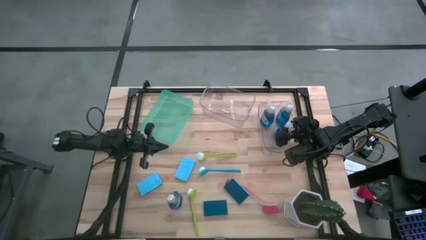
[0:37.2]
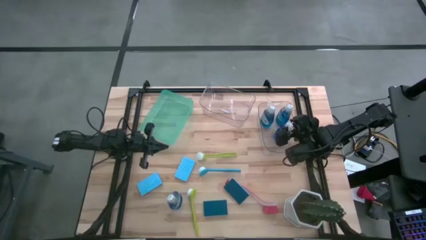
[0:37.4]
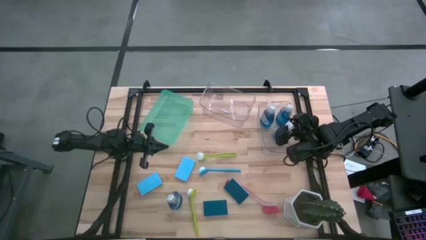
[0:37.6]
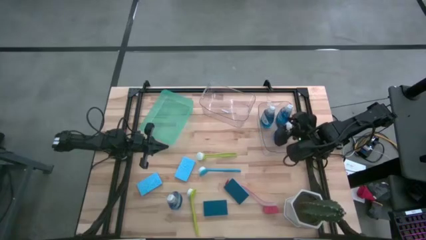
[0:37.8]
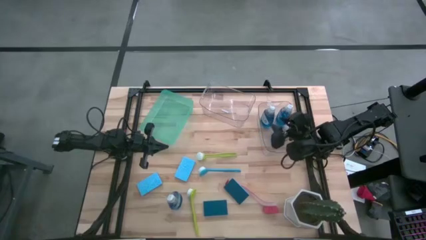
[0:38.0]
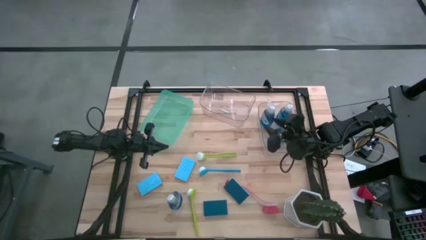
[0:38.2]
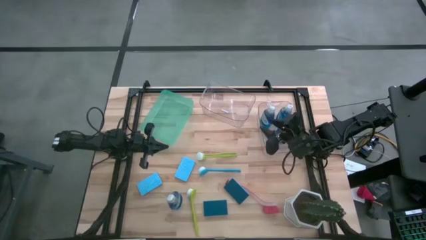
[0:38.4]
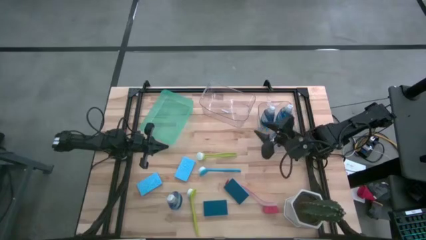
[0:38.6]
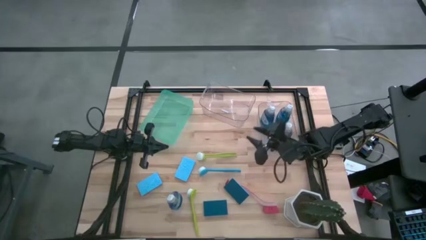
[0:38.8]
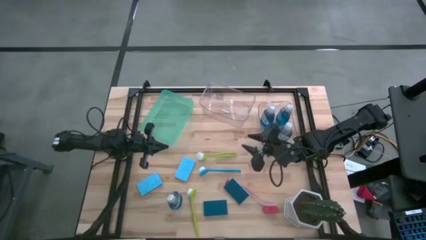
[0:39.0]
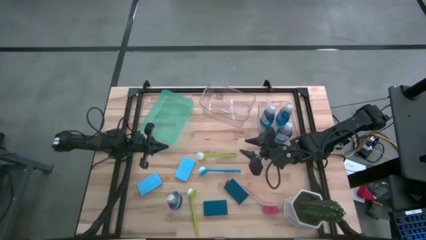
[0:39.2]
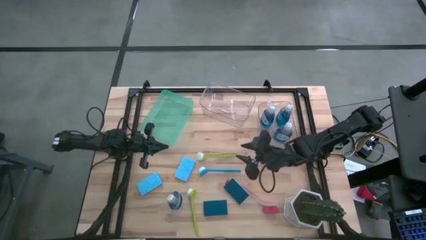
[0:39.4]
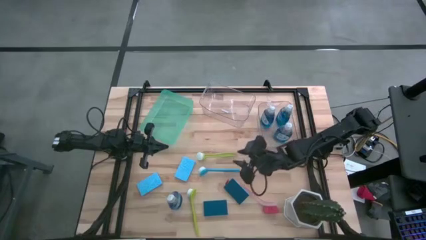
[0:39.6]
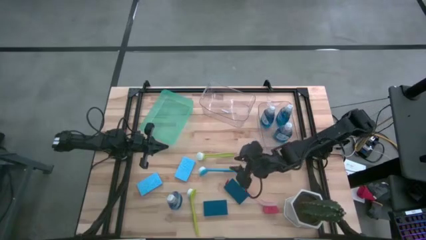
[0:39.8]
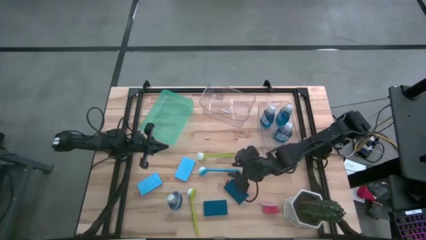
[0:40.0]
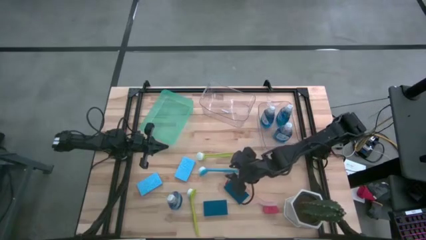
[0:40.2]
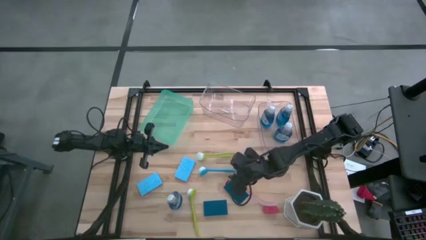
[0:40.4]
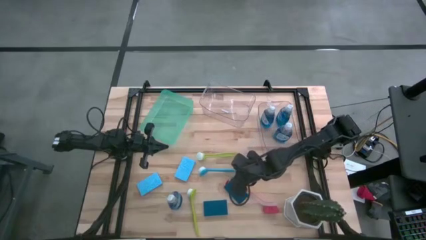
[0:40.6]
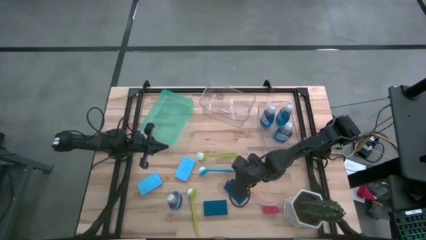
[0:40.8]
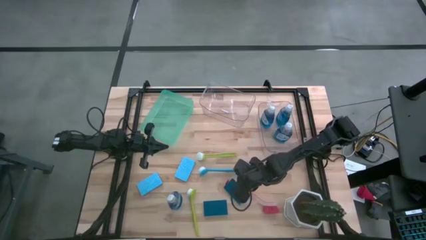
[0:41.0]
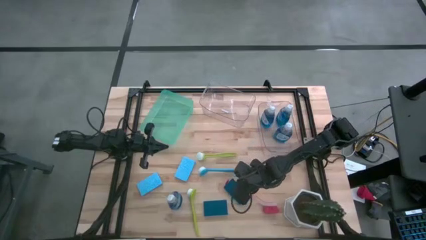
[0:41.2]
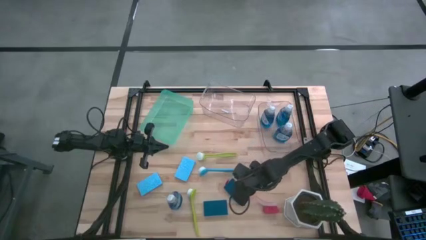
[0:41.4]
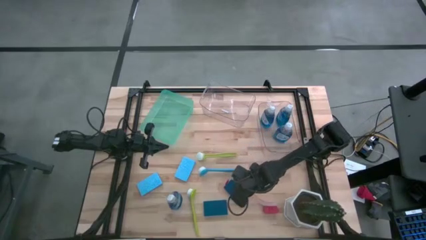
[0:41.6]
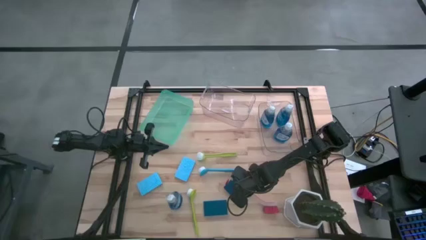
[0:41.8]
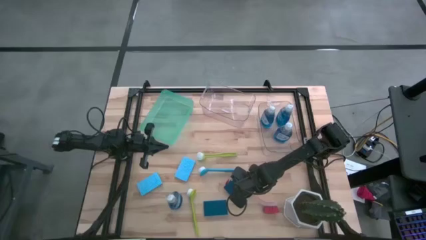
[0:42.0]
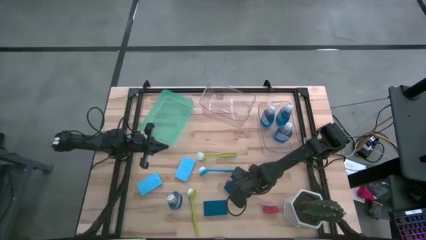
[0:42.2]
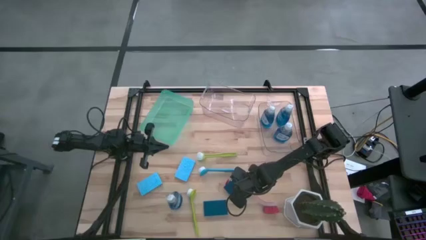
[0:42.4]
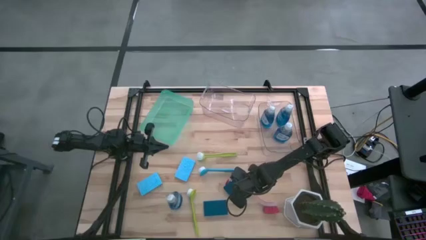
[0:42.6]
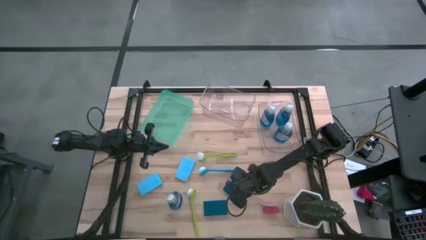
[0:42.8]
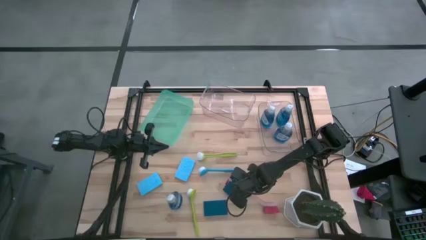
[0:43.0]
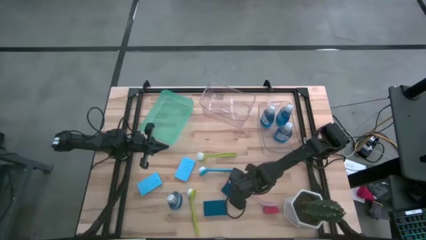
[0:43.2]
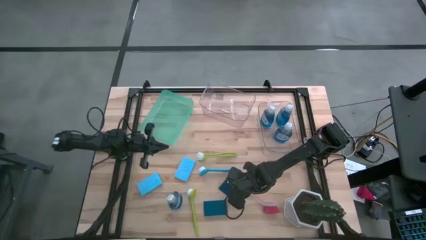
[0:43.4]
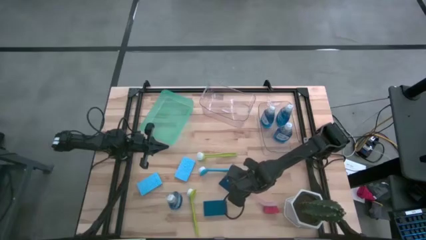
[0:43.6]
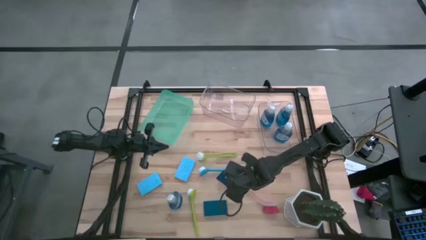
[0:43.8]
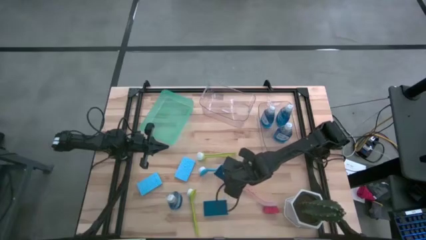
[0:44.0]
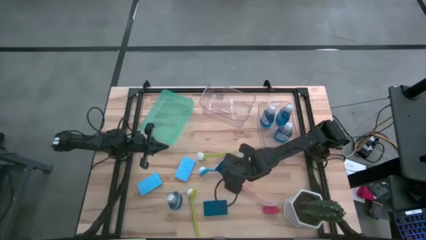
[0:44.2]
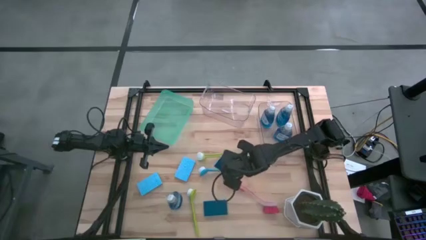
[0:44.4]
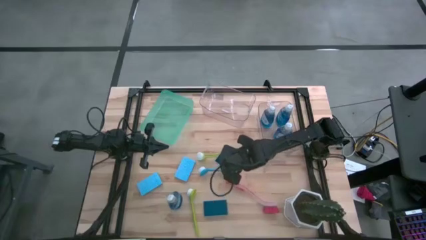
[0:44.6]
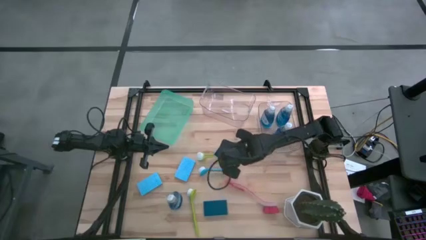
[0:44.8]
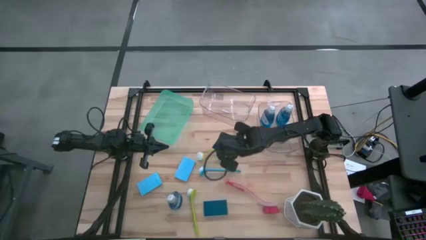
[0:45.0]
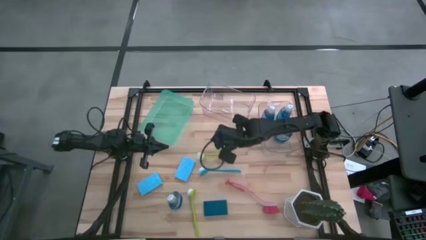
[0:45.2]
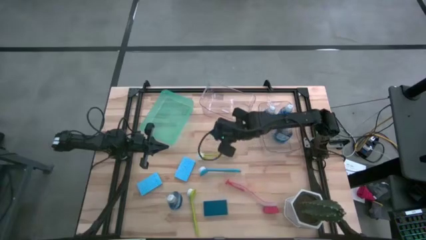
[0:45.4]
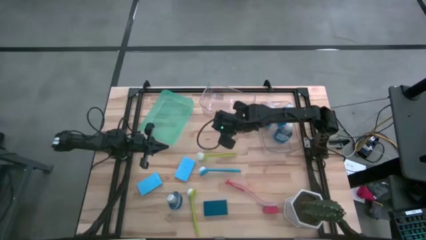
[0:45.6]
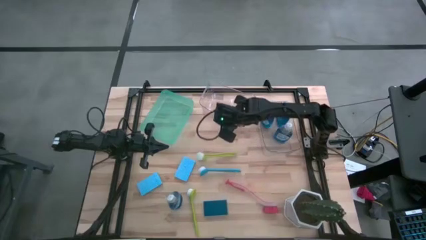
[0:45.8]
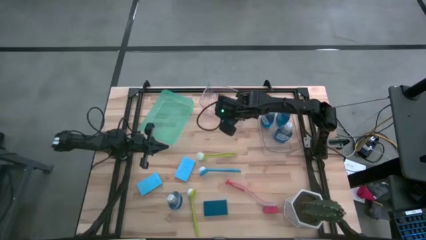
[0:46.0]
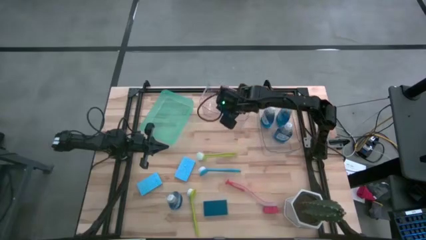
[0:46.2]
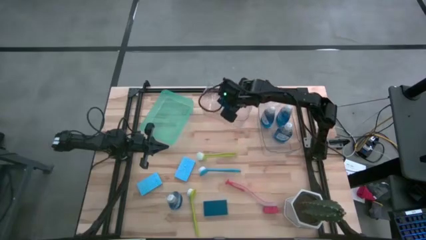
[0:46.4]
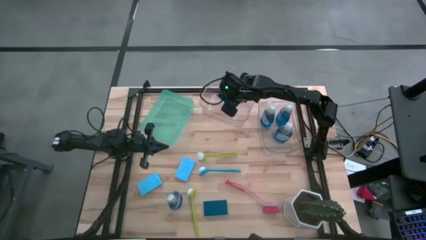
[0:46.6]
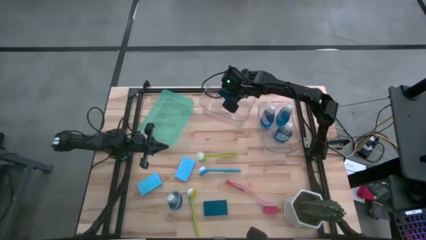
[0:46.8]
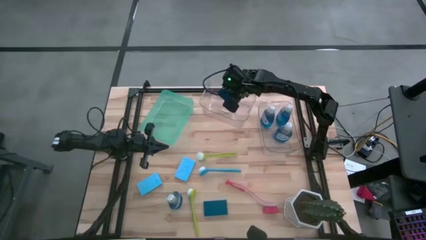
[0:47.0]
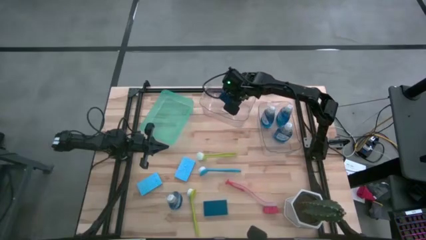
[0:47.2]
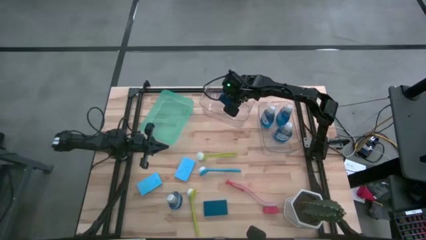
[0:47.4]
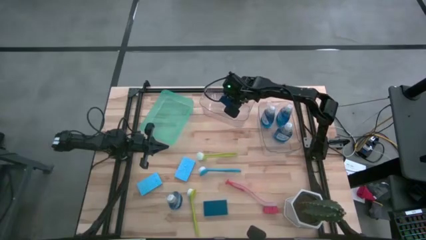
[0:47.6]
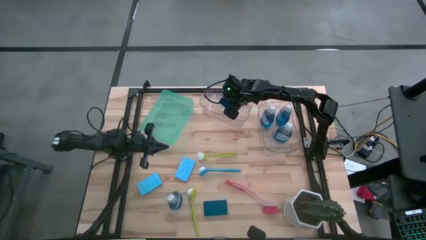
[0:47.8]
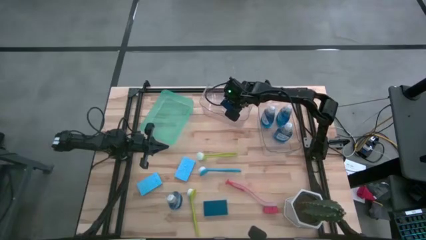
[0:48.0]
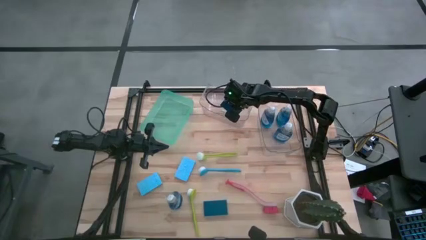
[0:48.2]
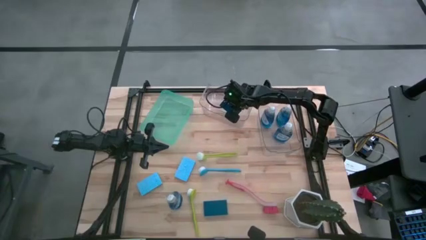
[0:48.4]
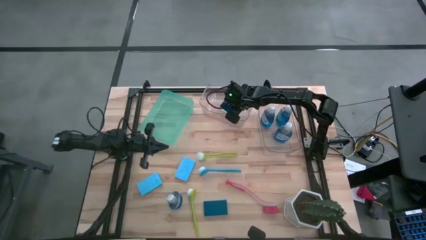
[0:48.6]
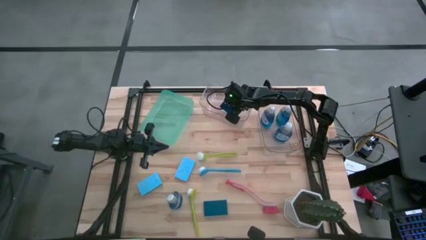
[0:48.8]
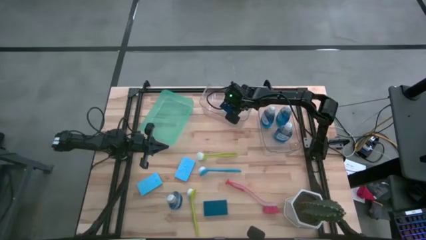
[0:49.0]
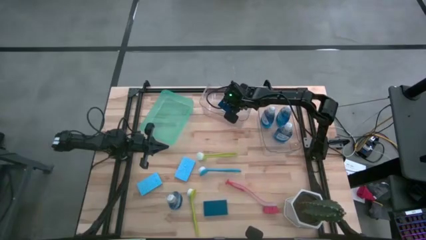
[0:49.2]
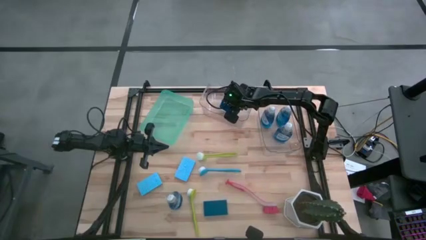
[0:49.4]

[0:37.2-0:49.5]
Task: Pick & Place Kitchen Sink Supplies
Put the blue sponge wipe into the left transparent bin
